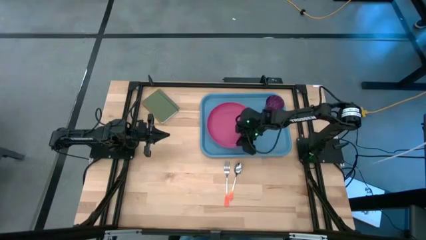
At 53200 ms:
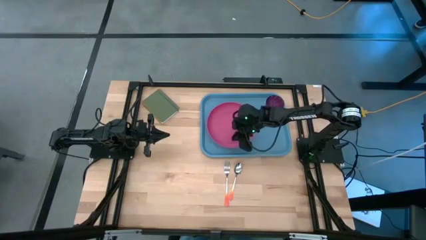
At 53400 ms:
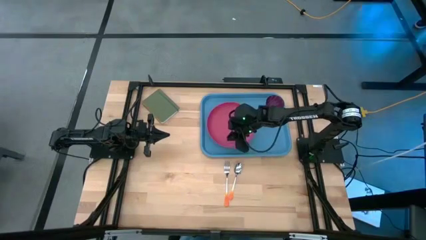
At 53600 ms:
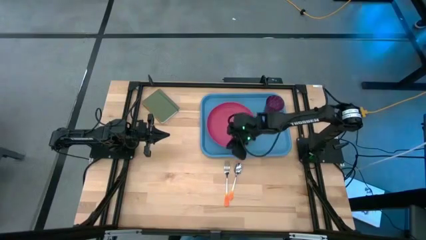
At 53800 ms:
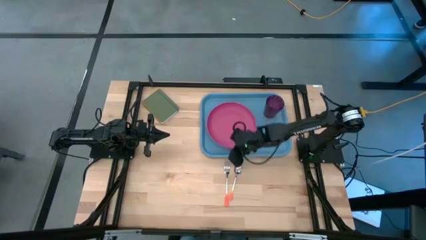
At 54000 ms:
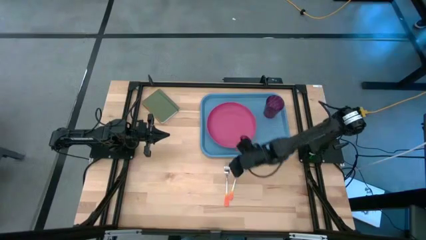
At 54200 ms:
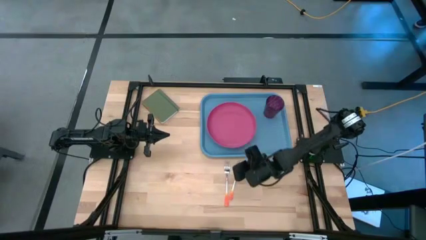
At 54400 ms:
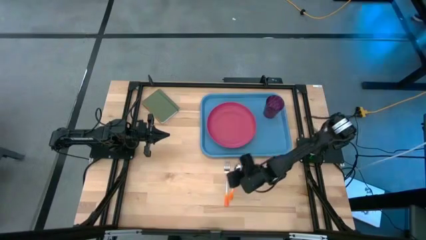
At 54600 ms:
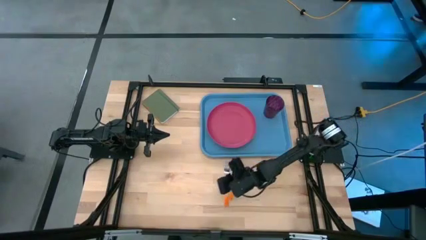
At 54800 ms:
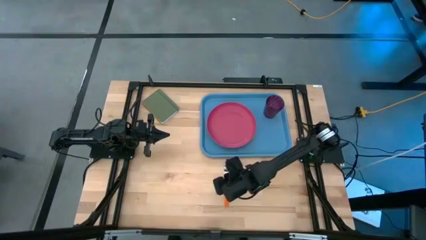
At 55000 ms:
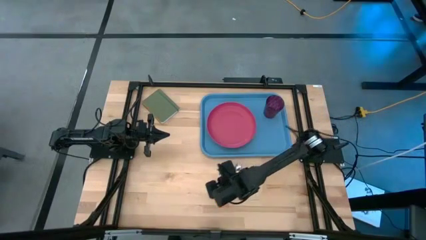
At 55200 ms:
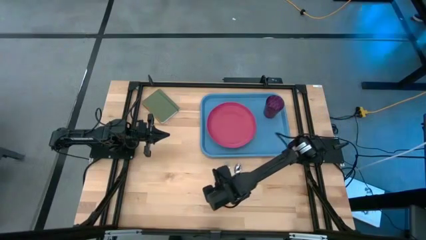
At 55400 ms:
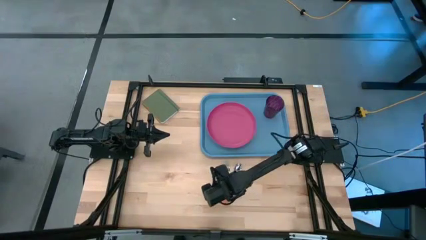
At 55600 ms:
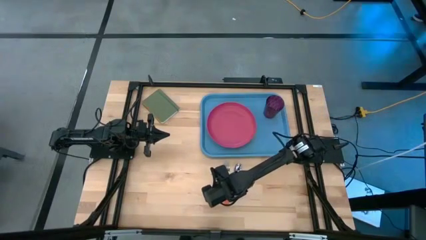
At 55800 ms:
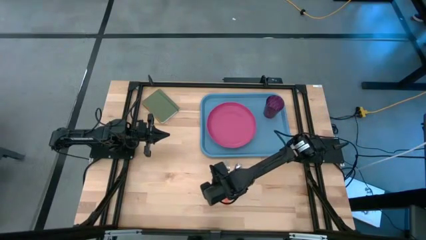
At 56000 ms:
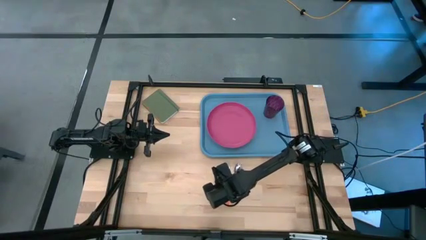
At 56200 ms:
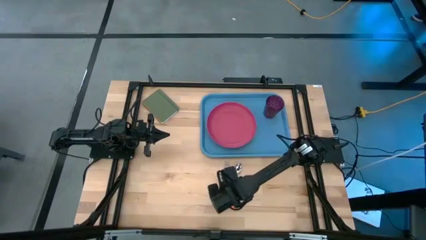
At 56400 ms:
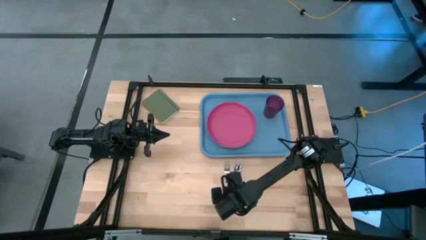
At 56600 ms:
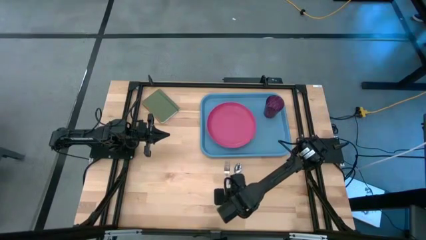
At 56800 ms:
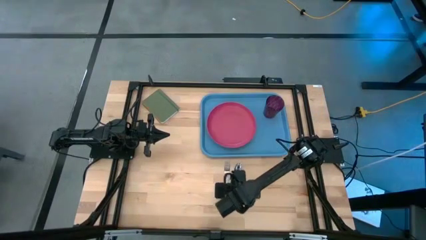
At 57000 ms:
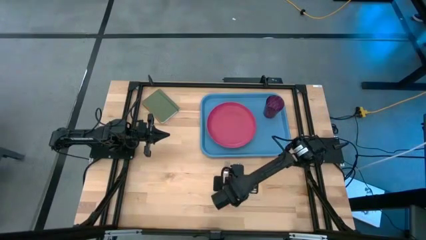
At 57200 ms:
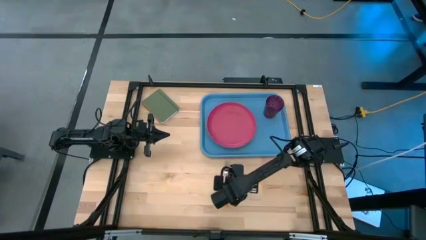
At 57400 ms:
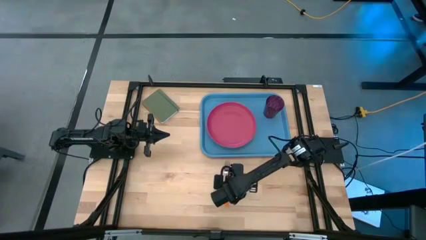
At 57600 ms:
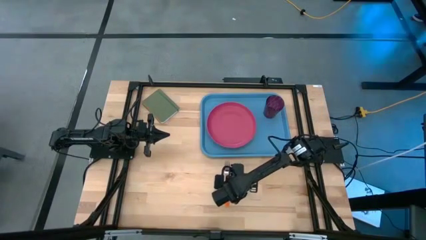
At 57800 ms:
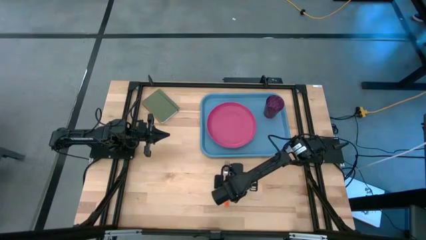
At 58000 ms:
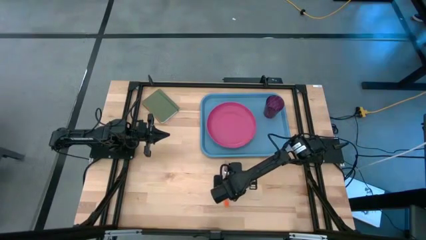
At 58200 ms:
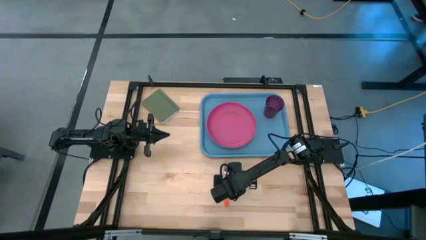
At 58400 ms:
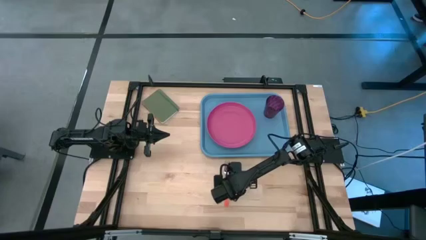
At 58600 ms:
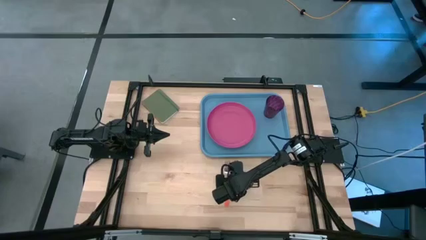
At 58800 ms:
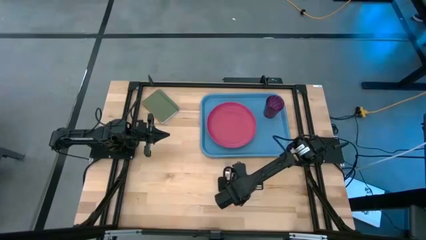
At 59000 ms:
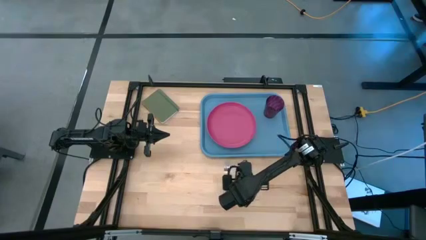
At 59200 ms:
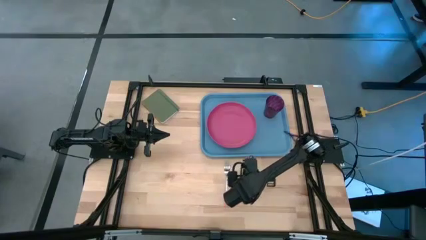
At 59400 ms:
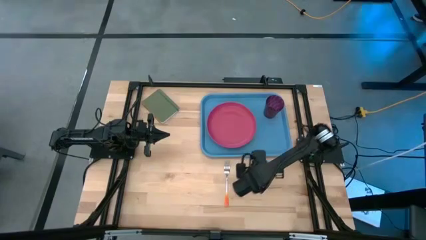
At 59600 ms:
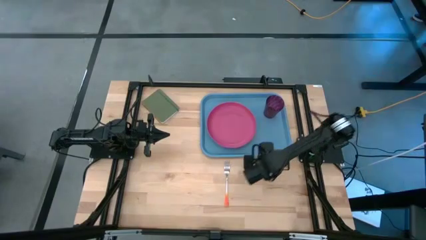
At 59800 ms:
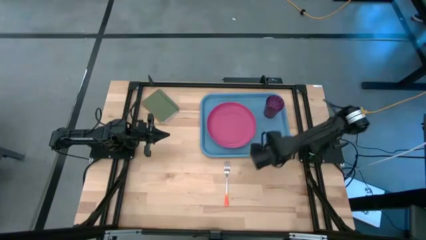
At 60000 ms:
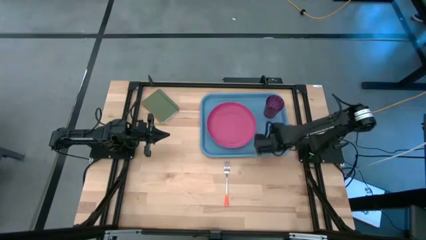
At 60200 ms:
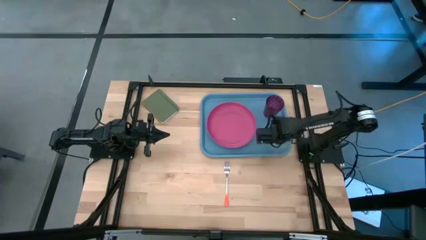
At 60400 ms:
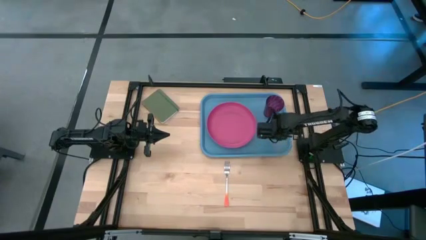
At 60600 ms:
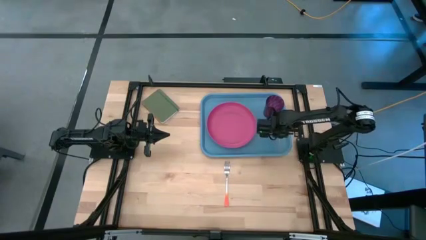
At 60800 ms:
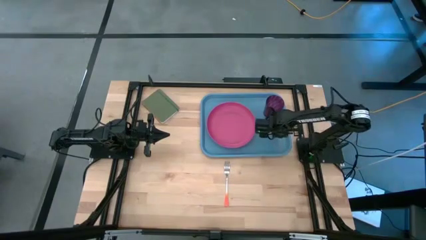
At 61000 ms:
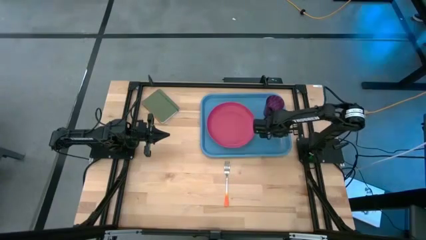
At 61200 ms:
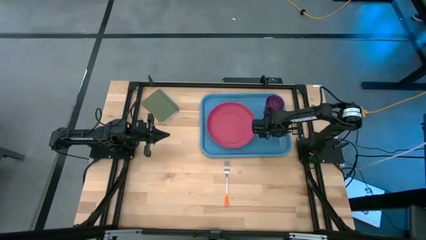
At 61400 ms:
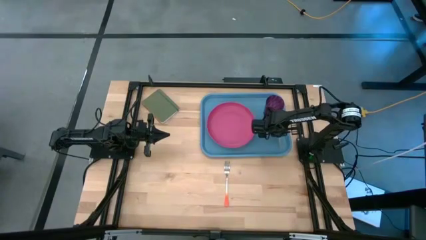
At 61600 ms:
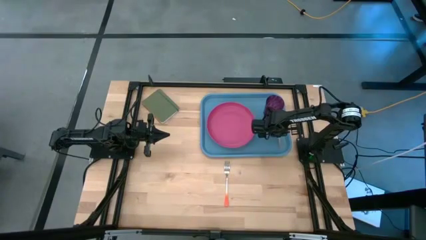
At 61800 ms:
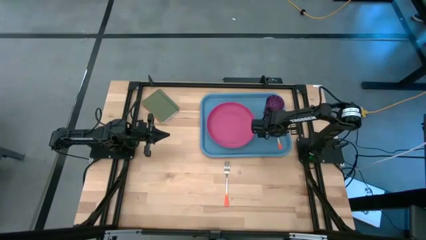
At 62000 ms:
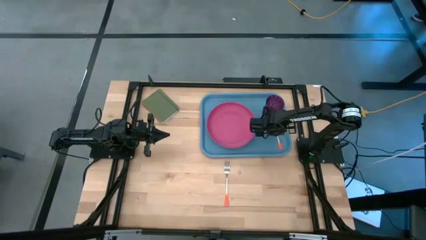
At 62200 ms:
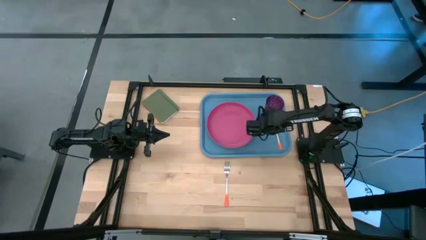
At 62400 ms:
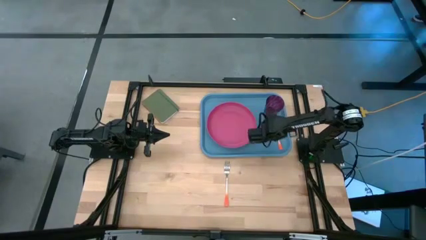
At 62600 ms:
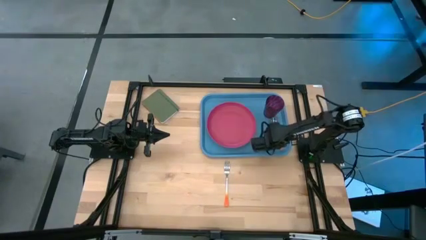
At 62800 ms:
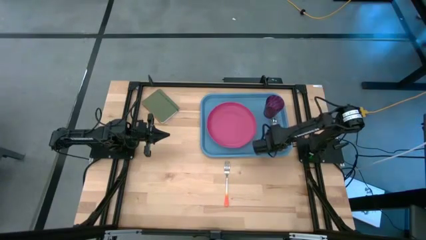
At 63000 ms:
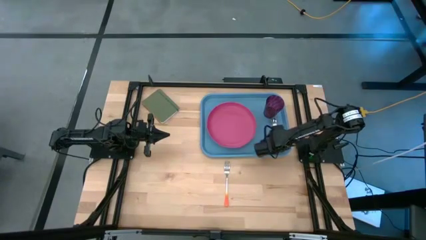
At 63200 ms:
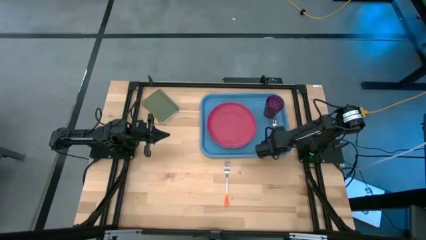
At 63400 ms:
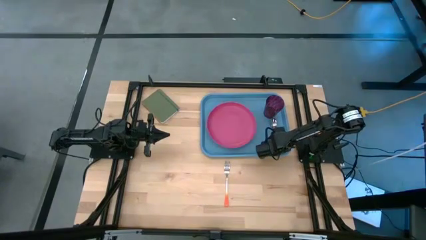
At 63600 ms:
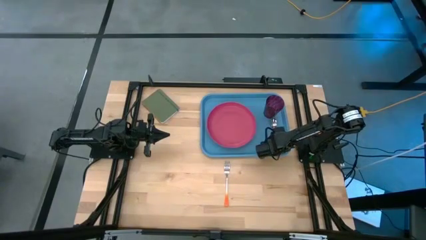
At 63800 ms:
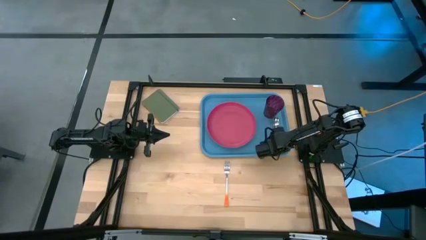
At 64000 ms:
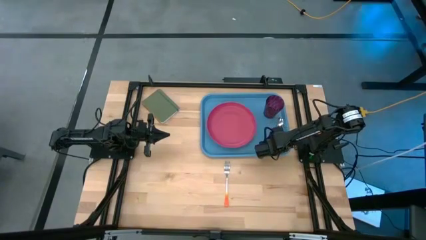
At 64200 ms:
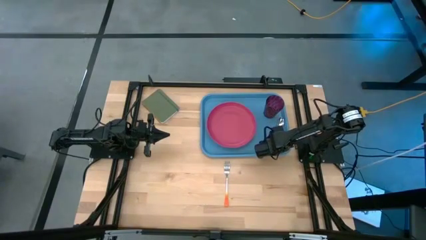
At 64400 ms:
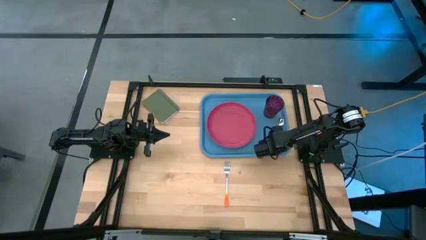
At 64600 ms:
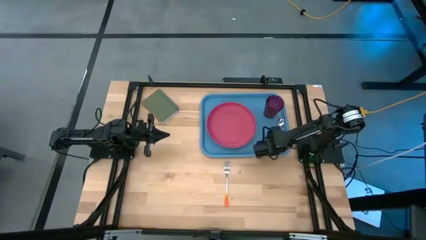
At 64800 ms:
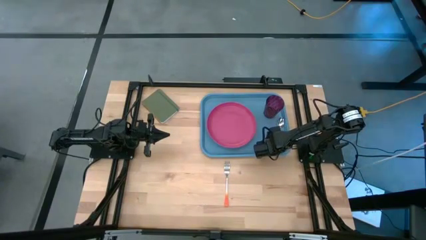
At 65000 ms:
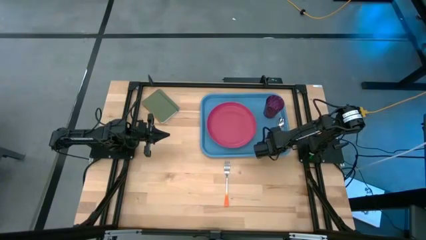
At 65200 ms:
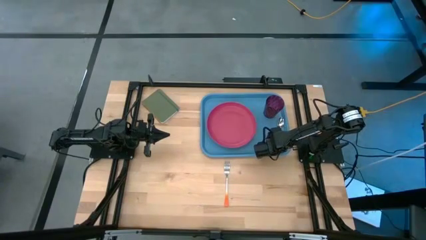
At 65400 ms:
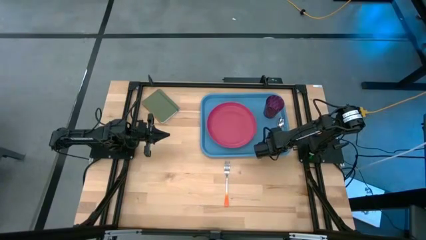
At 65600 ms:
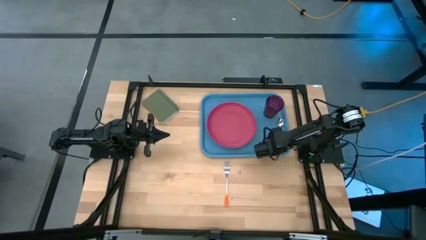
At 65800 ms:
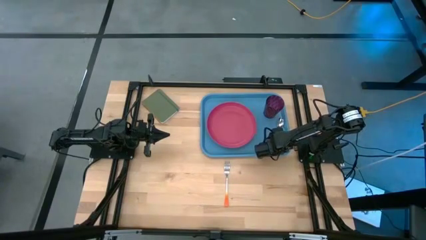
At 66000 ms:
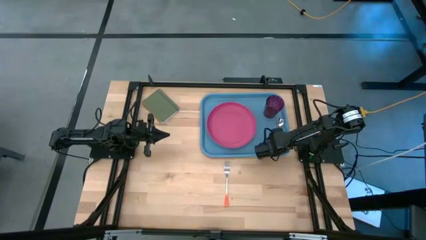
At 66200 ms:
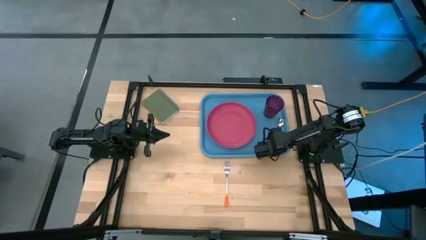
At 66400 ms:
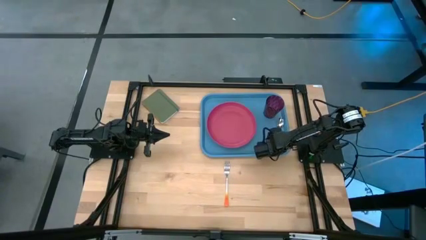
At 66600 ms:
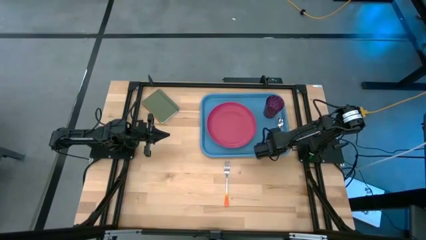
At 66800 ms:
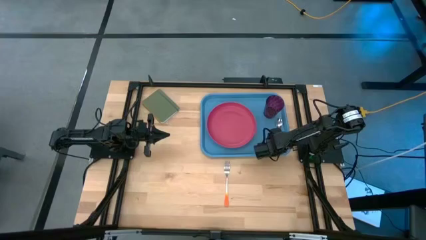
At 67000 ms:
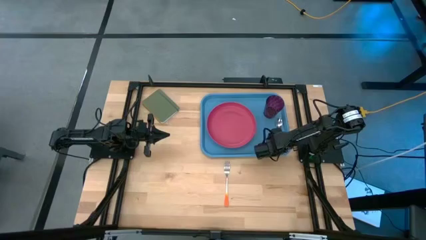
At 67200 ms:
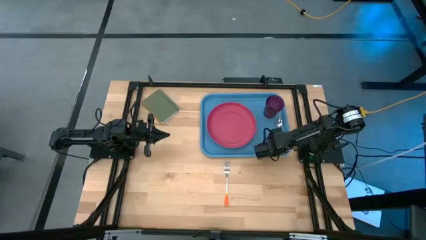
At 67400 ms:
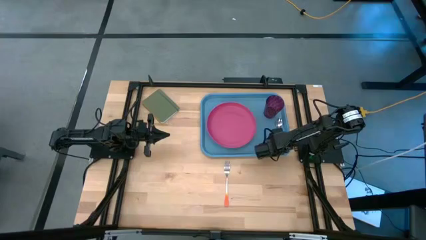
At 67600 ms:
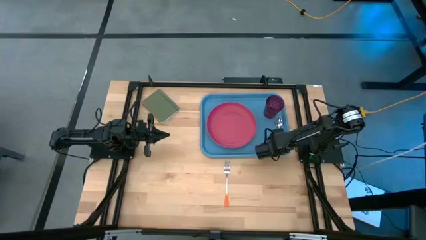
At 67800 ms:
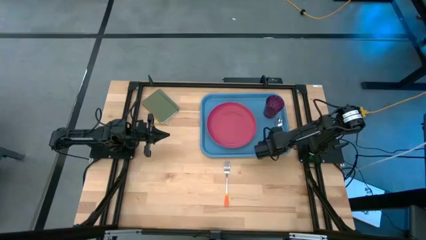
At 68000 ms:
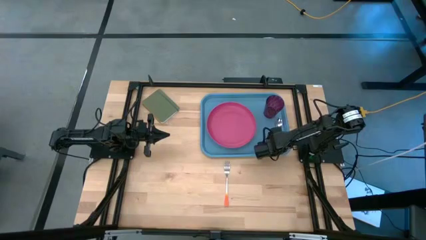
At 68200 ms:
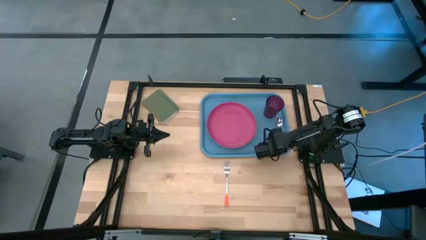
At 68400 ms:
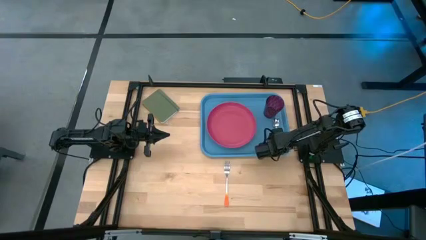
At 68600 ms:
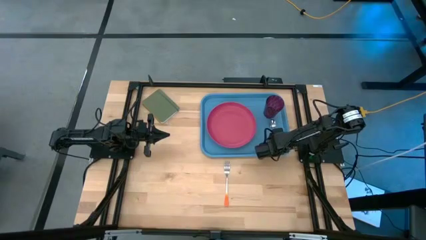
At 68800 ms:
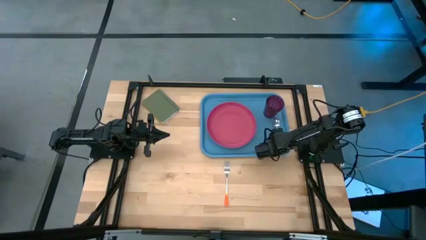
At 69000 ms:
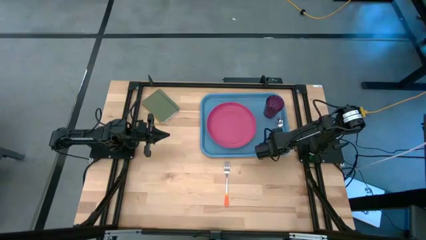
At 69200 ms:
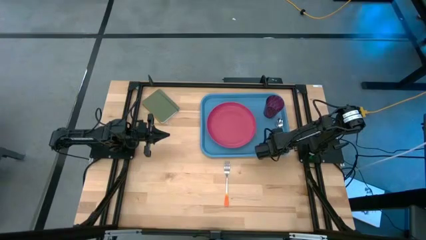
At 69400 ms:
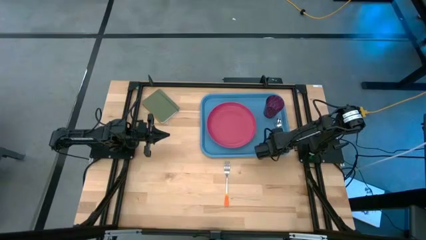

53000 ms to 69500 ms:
Task: Pick and place plate/cup/fork/spoon on tray
Put the orange spoon to the left of the blue tray
